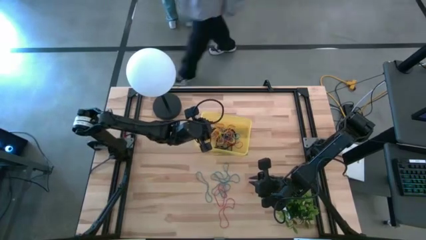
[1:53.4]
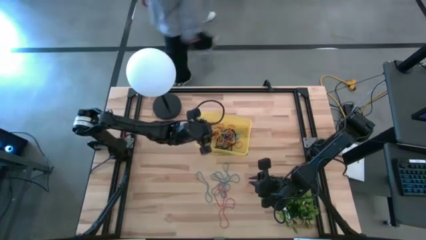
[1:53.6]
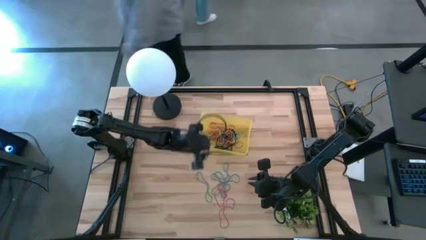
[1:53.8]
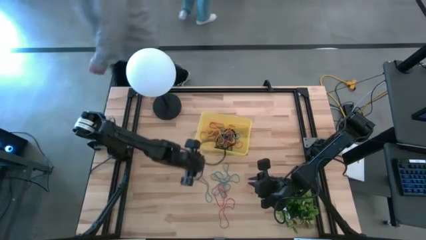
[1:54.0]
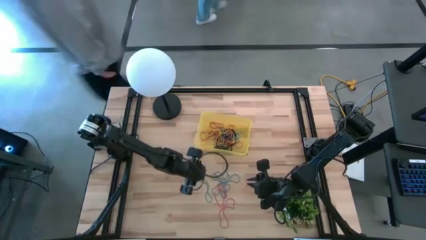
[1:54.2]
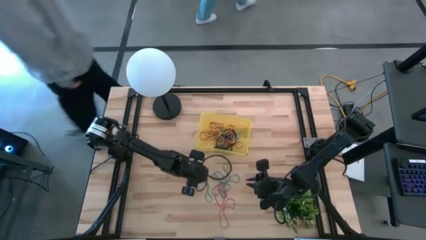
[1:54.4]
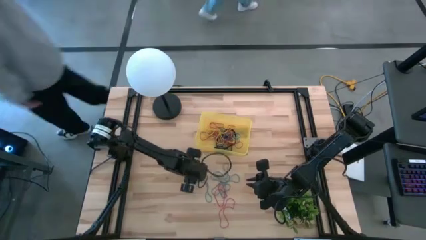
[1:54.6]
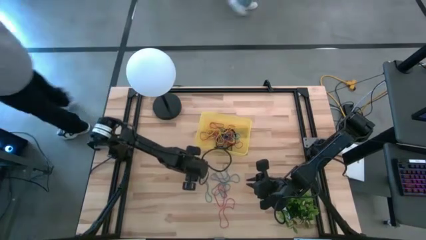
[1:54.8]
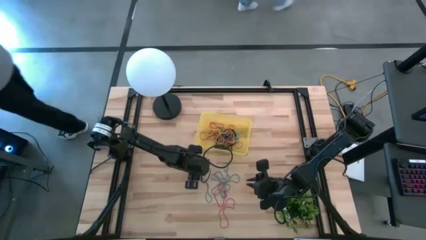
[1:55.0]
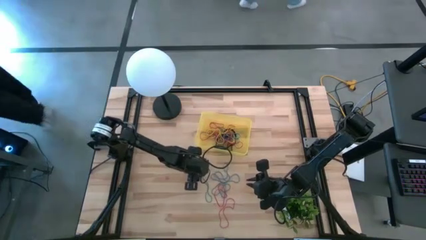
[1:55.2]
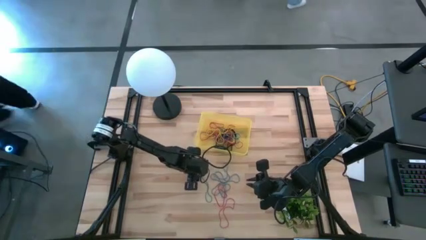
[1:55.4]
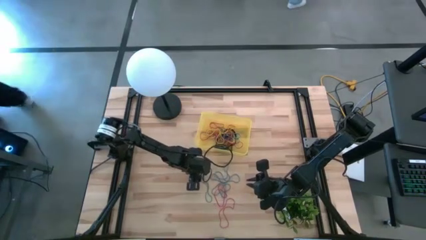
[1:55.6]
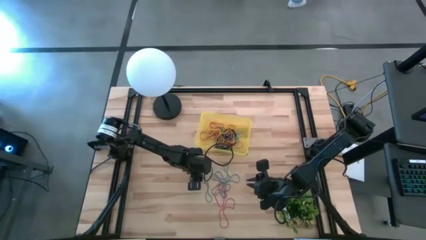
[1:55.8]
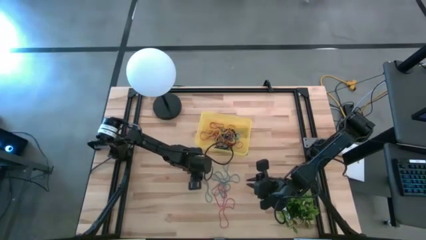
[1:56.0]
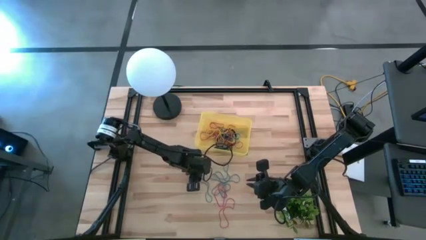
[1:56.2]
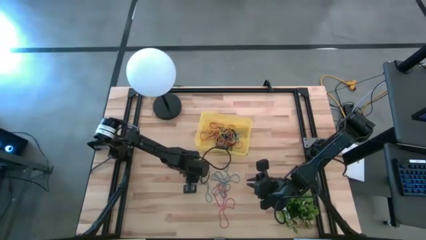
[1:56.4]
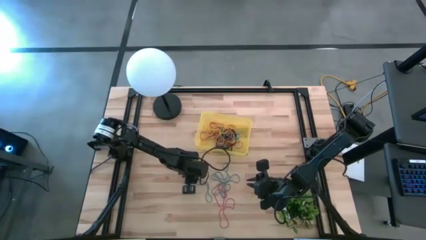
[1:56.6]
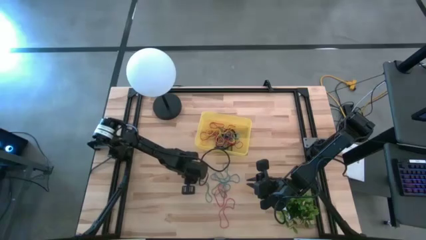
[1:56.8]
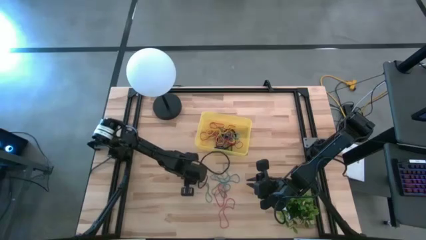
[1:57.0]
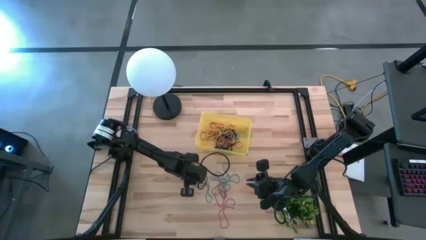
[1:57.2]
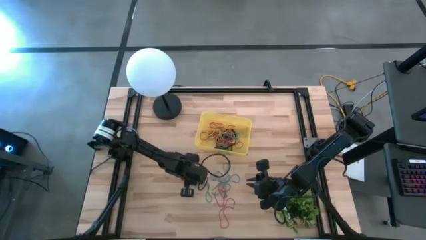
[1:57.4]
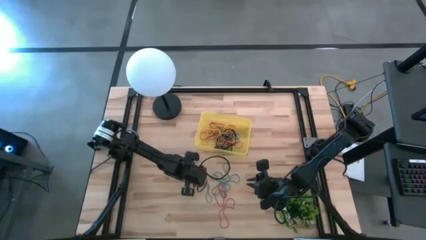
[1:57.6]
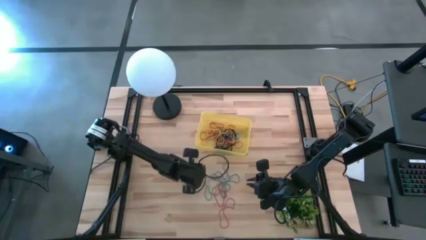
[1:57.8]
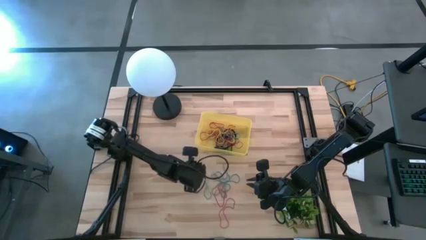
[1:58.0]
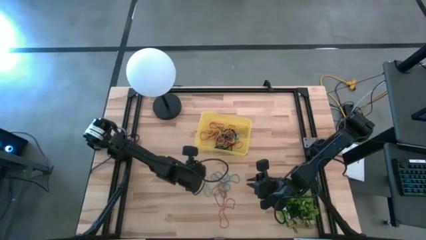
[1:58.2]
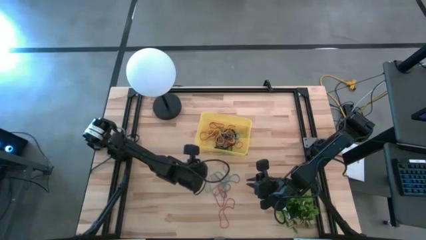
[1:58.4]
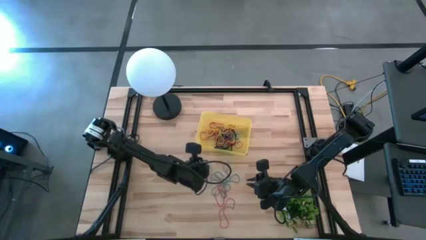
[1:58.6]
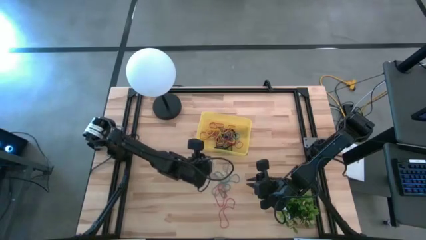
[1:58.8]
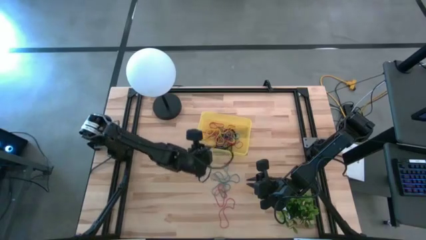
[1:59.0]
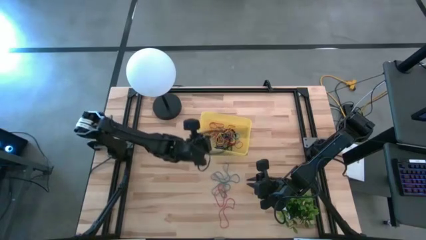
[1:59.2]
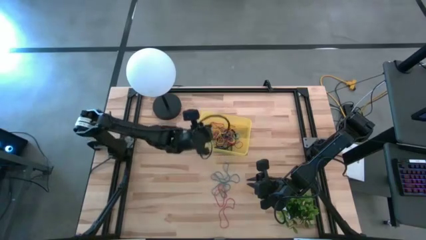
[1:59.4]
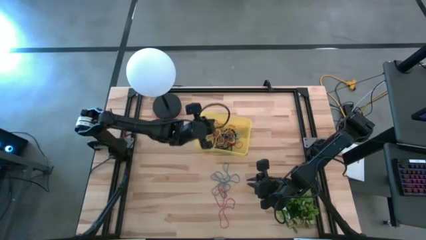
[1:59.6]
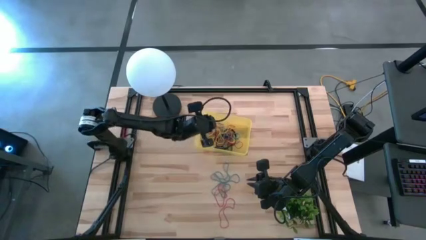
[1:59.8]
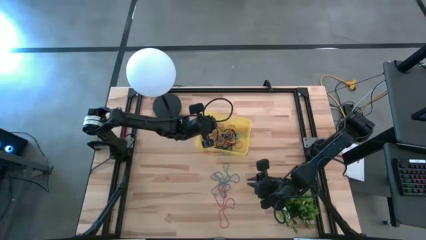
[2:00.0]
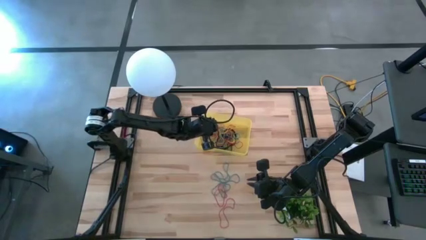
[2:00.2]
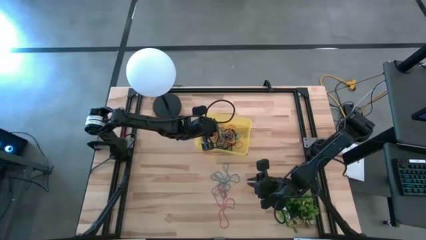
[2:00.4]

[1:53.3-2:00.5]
Task: Pick and place rubber bands into bin
Put the blue rubber band into the yellow bin

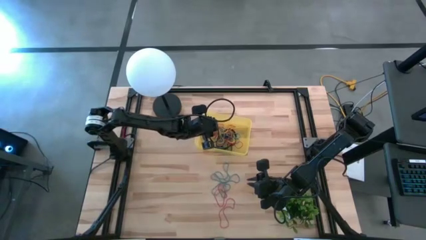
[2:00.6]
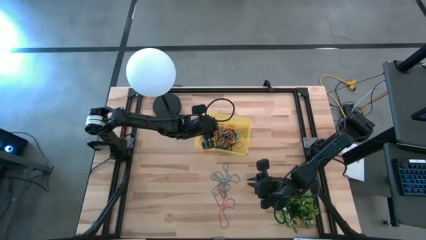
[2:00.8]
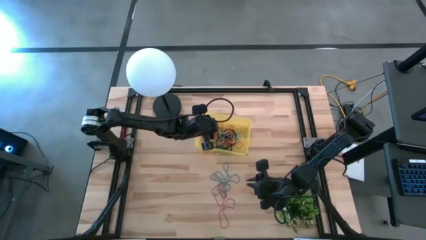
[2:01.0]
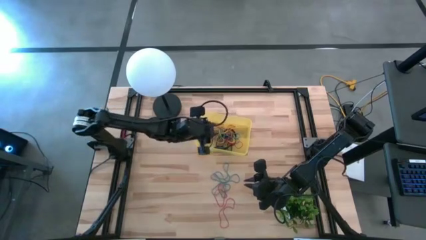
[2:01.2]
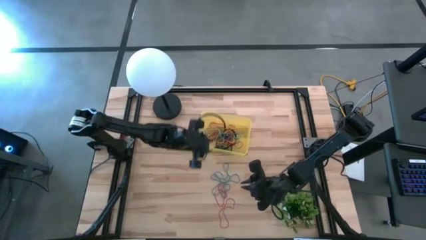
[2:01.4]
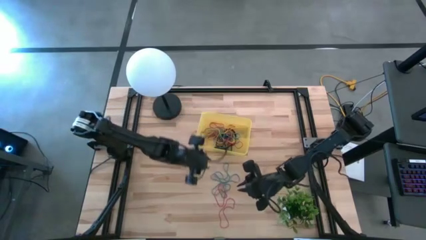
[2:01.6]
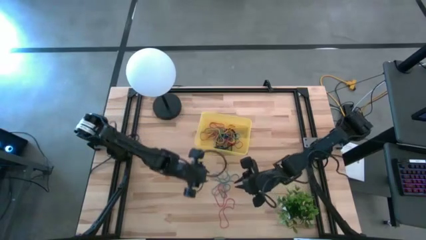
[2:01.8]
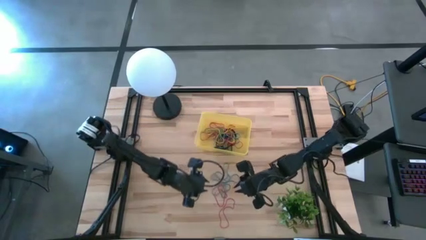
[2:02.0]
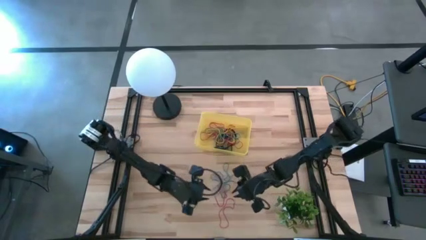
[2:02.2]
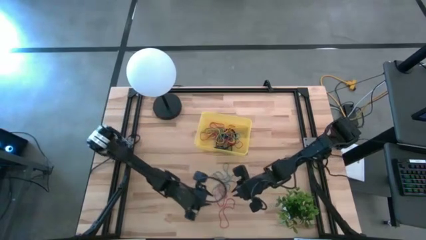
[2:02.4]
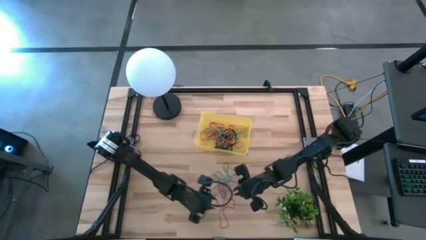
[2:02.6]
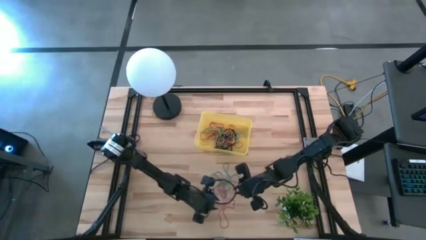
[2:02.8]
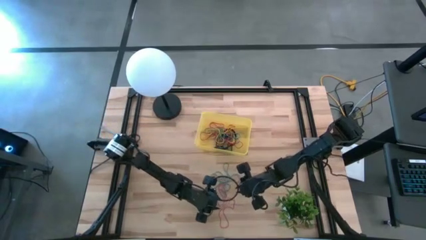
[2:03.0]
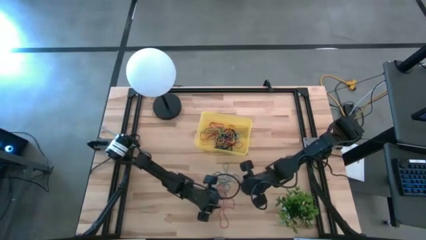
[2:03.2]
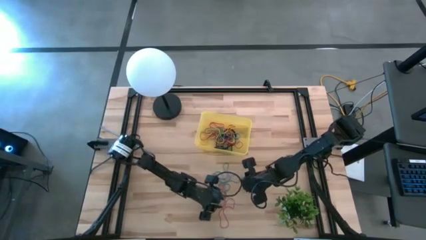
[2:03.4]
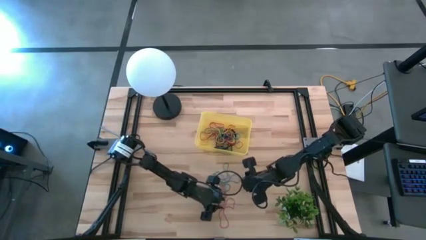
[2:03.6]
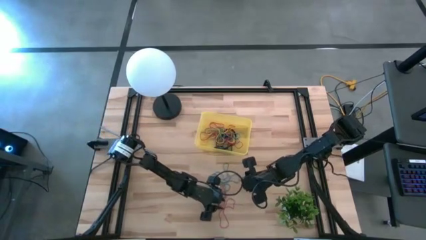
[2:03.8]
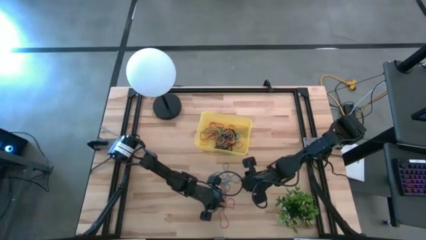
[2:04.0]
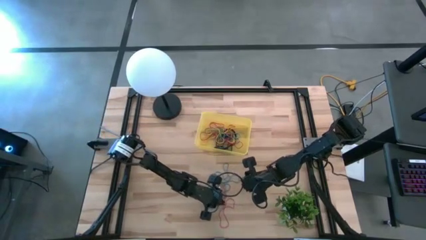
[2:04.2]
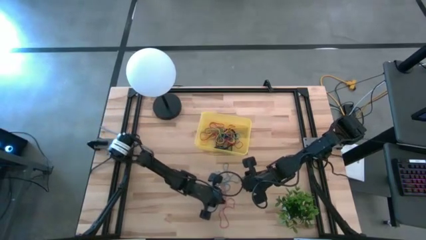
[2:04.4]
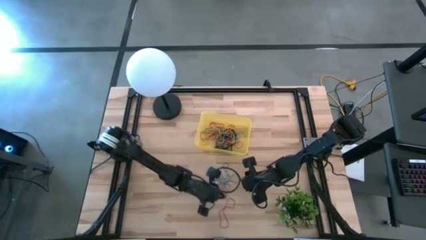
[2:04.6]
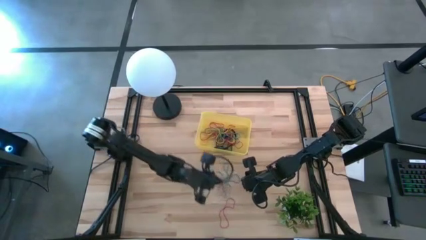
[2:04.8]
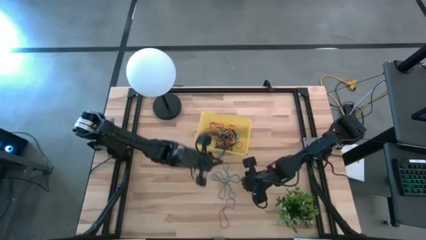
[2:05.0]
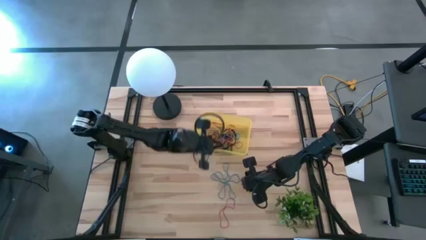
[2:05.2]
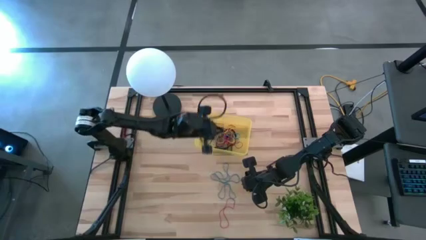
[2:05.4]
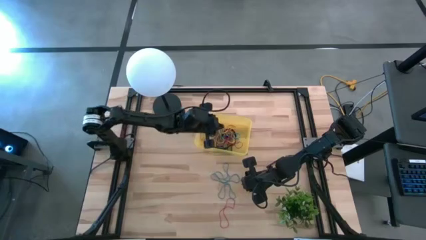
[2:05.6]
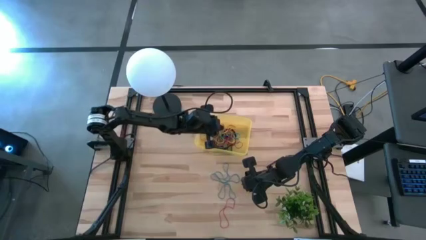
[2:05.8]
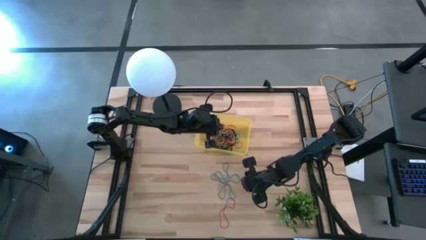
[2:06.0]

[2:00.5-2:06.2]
Put the red rubber band into the yellow bin

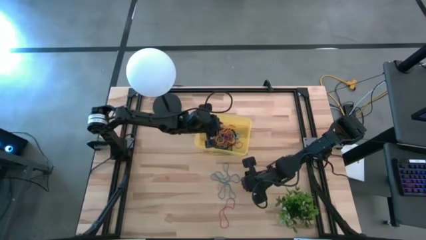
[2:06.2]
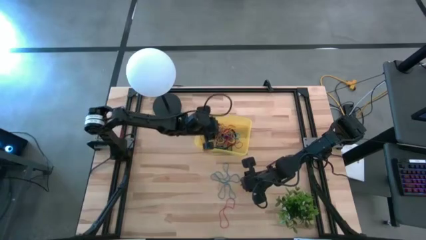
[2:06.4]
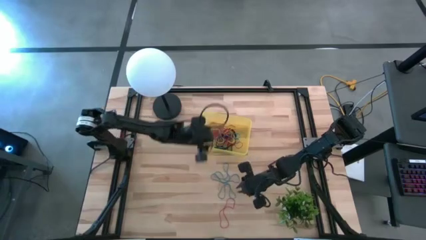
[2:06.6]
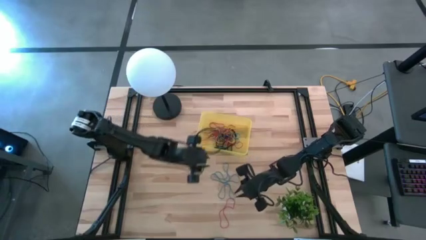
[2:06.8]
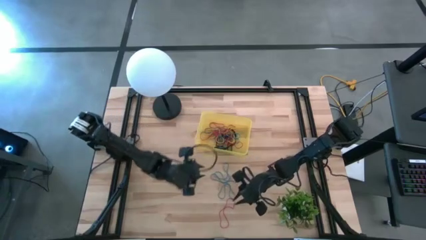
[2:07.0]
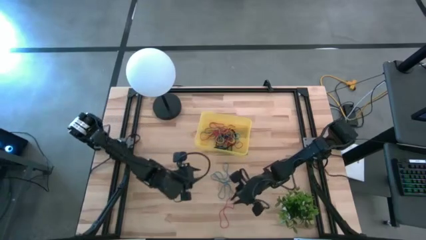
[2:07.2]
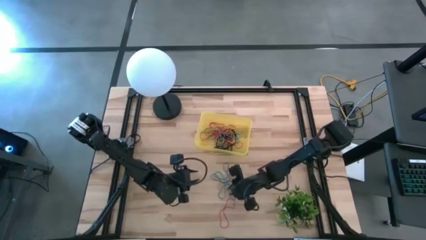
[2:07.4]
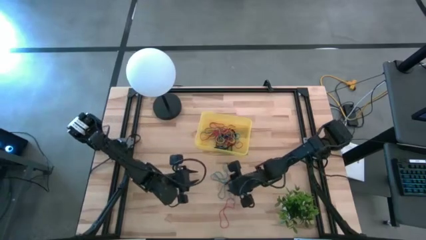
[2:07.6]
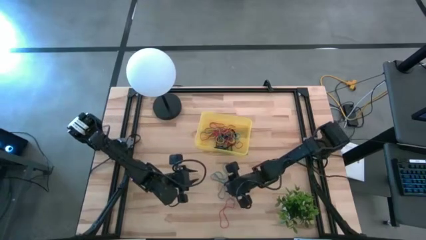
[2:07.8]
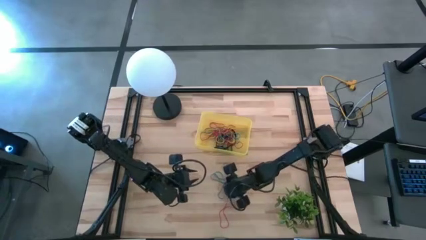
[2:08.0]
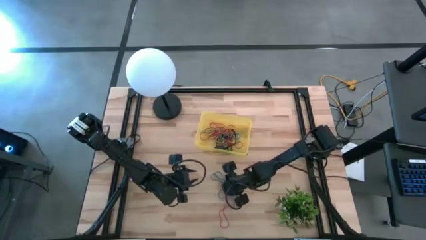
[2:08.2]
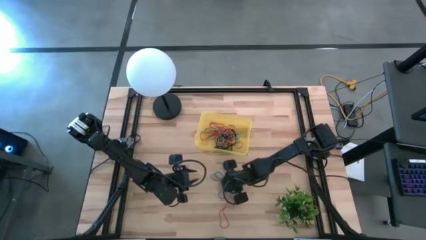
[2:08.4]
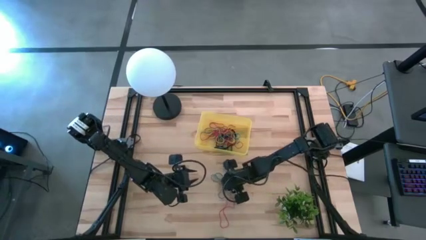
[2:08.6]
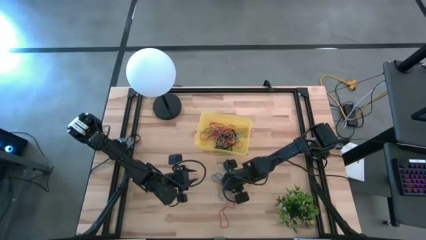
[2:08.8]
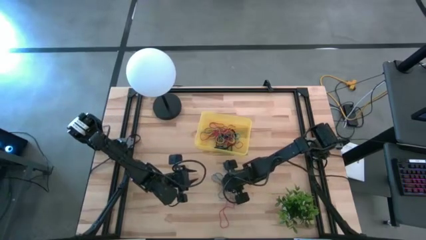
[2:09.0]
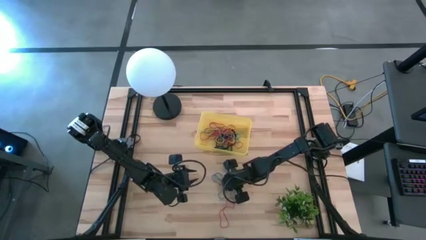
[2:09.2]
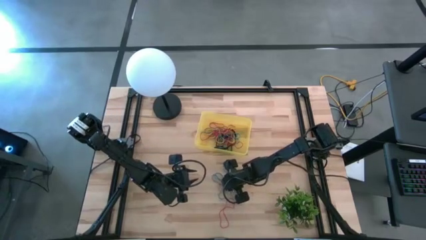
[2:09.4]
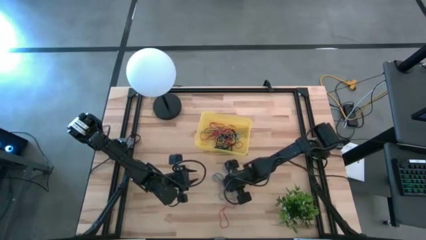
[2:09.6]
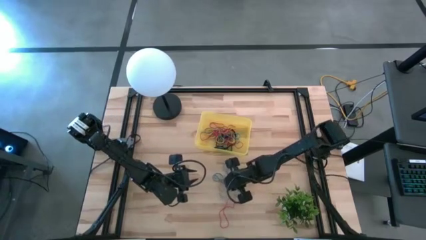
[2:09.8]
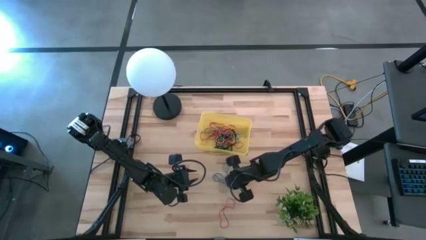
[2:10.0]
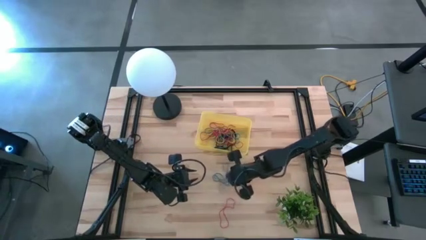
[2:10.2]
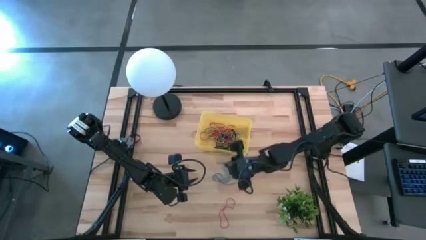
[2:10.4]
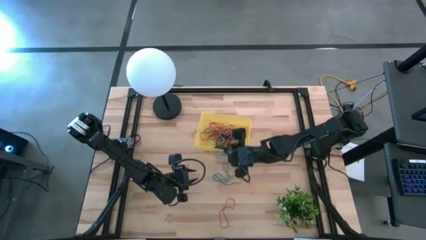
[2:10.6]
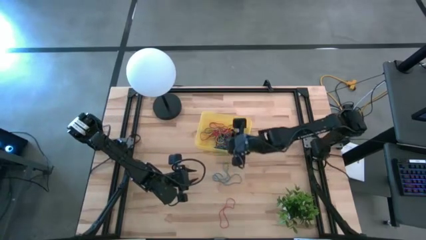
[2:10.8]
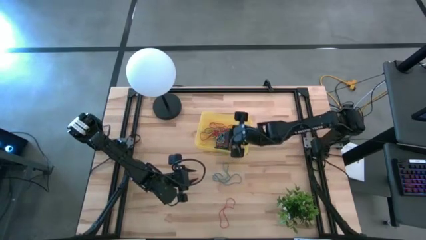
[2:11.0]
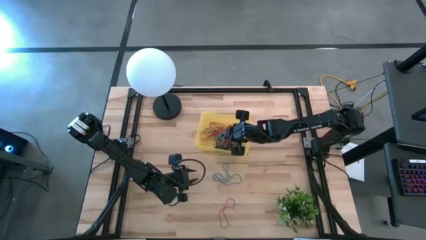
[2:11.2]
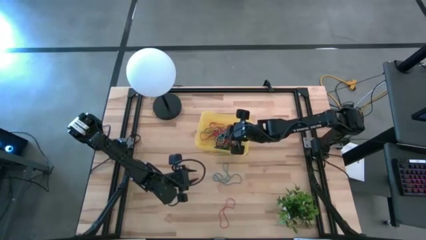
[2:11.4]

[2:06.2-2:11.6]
Put the blue rubber band into the yellow bin
